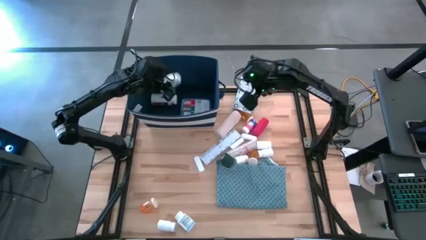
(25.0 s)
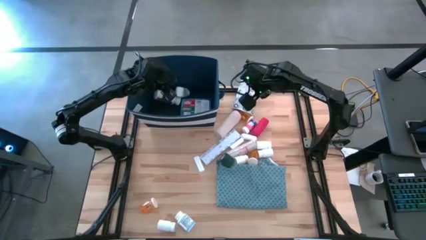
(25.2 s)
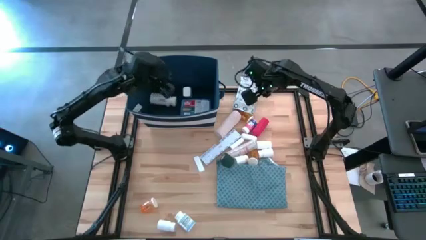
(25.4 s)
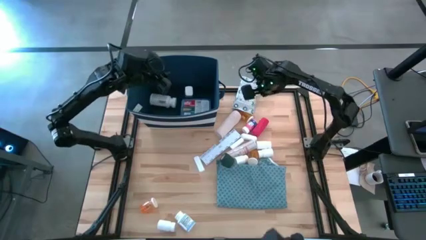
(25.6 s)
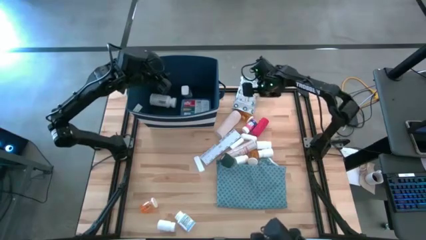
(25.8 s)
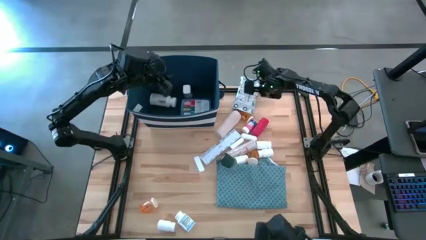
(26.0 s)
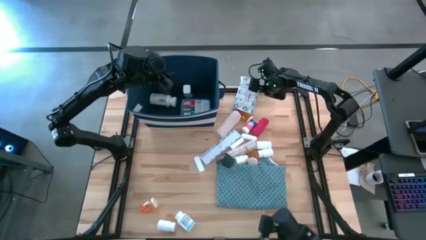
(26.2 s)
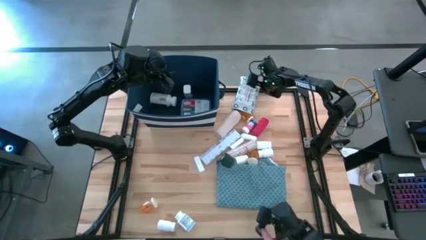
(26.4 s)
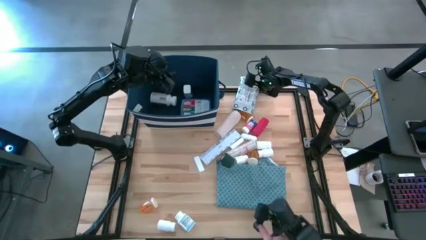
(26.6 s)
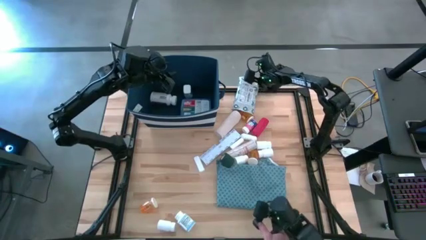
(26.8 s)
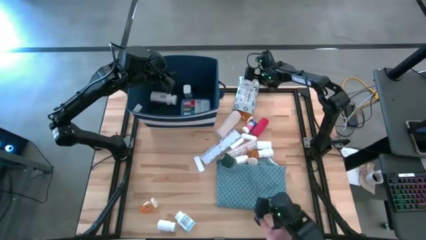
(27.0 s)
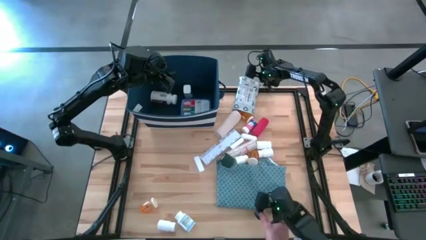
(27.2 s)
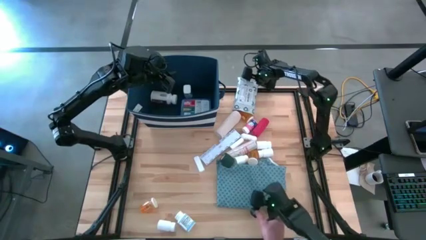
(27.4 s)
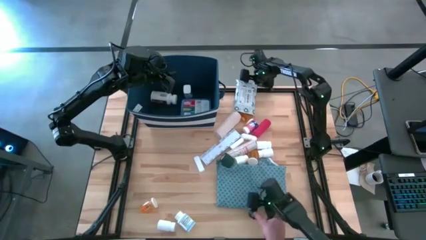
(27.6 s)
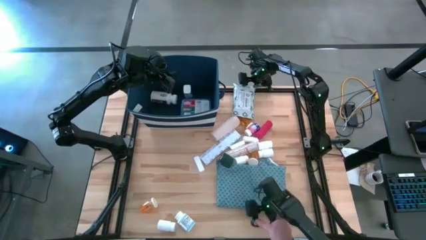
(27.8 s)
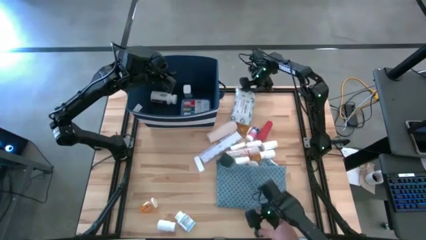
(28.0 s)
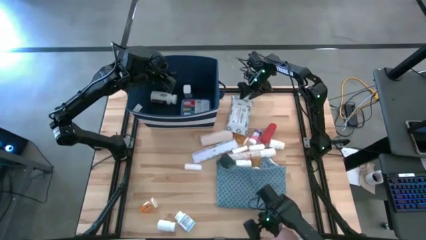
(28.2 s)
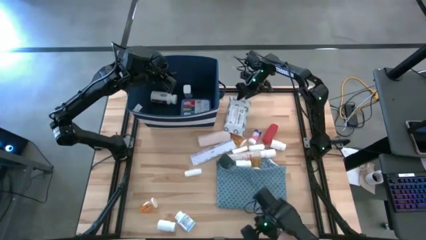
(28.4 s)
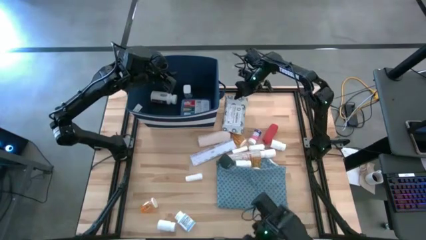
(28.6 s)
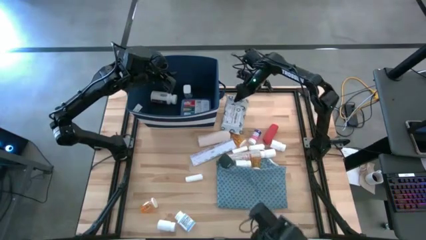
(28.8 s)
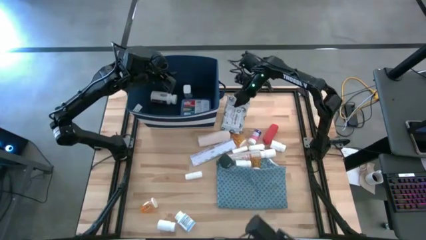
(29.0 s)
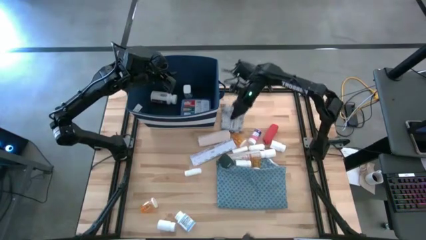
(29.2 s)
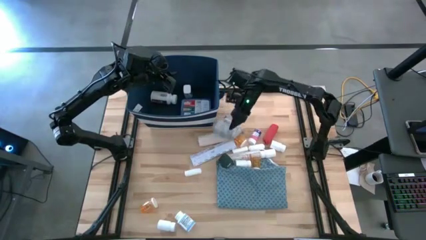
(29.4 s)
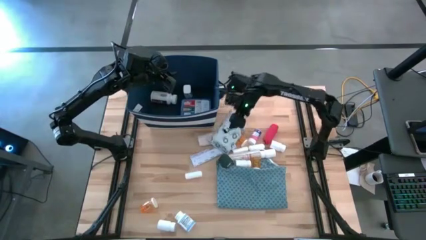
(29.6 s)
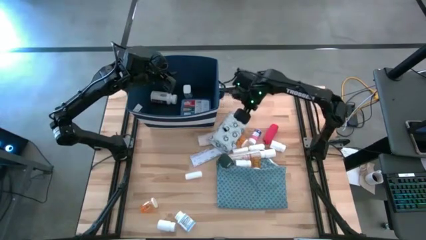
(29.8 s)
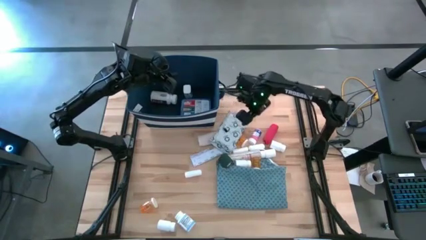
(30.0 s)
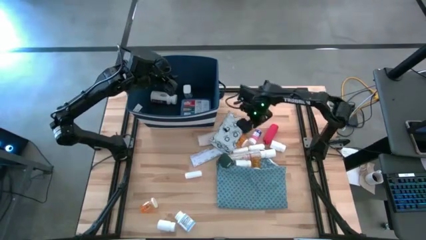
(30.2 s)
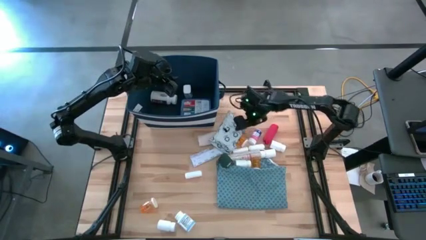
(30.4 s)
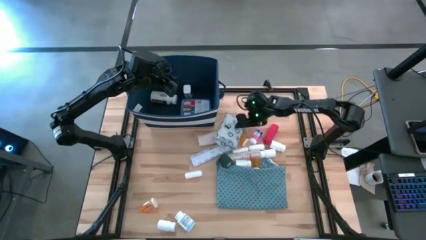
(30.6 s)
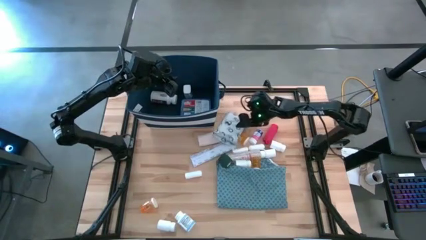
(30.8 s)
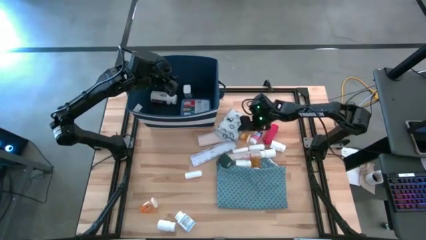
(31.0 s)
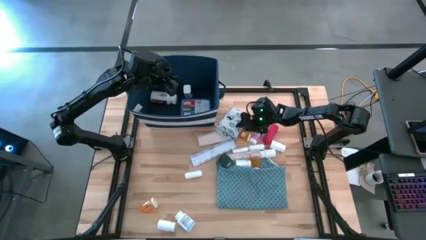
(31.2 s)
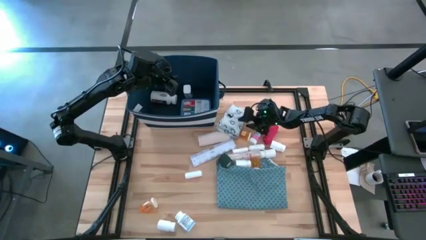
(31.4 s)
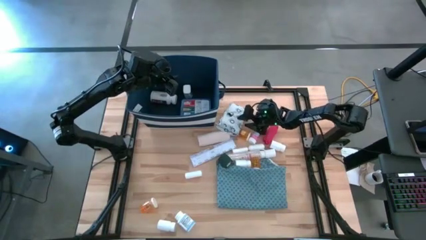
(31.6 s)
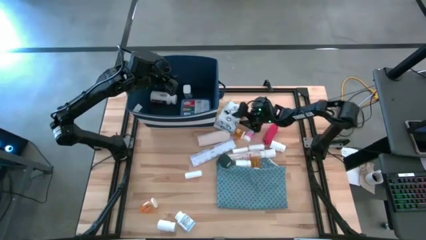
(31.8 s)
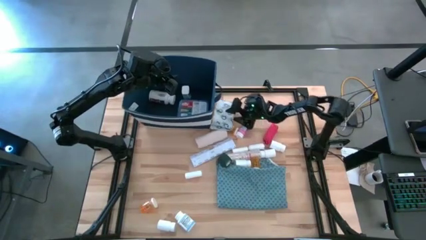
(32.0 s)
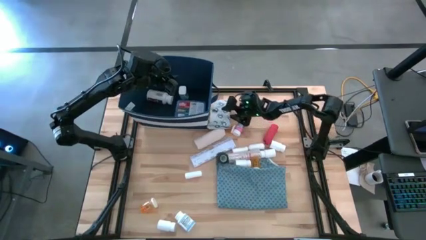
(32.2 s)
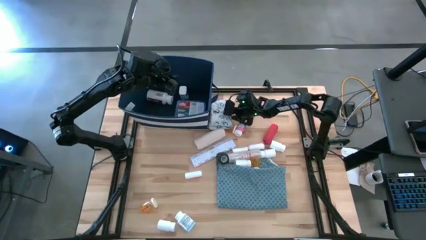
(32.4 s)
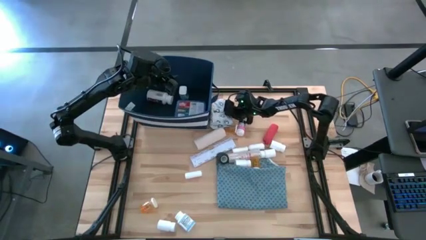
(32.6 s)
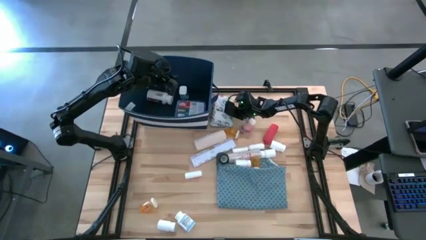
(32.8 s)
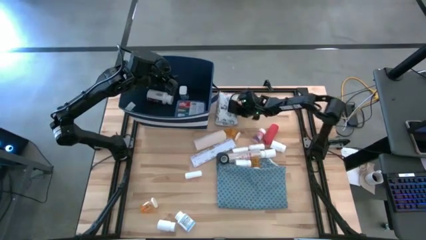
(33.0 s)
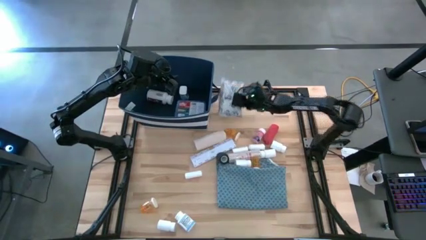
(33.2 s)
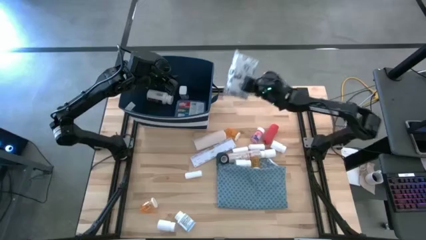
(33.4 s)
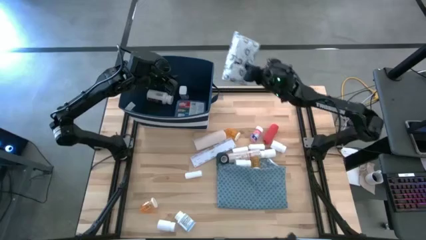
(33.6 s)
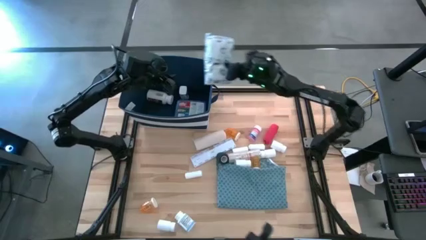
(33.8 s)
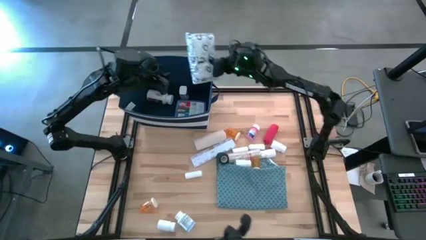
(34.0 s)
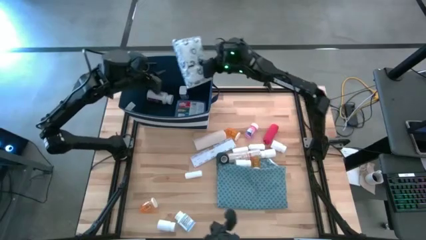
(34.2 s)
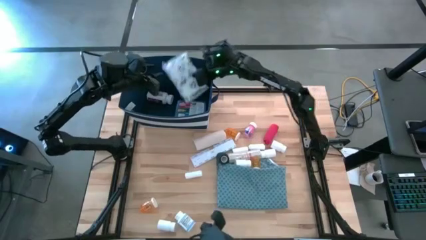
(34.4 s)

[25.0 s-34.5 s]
Task: Pick & place medical supplies in basket/bin
Put the light blue mailer bag into the blue bin

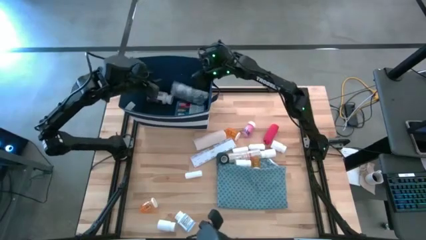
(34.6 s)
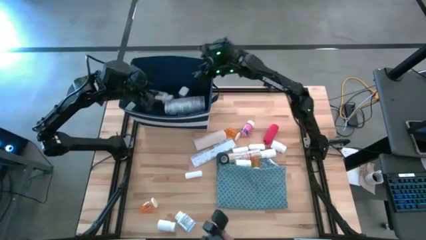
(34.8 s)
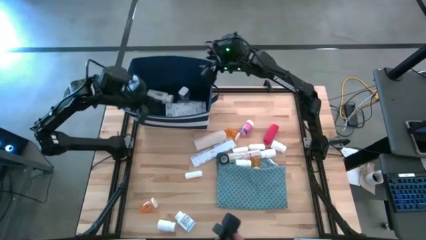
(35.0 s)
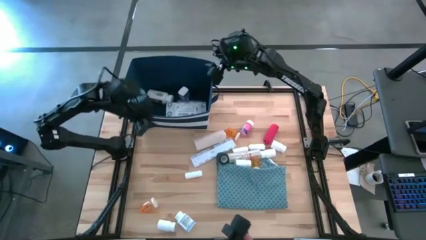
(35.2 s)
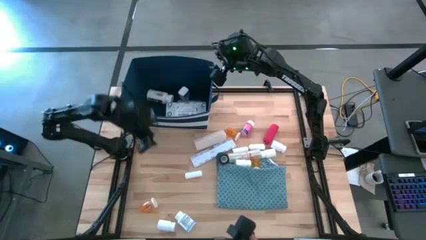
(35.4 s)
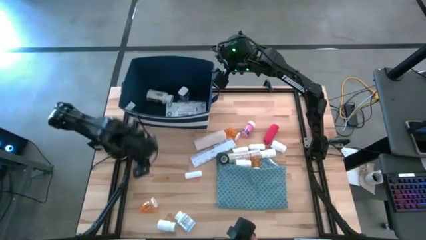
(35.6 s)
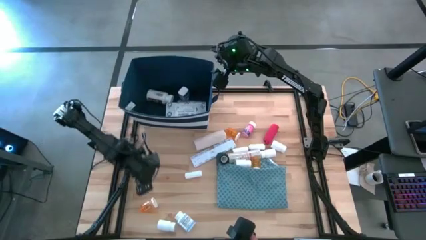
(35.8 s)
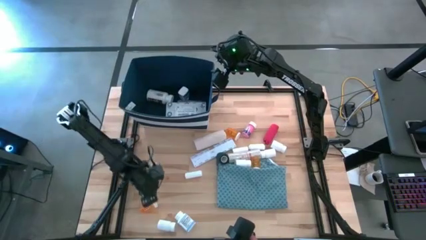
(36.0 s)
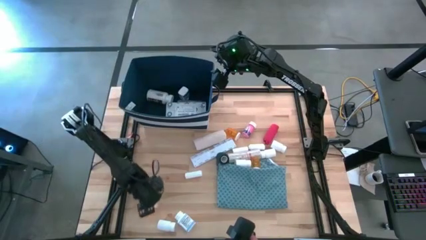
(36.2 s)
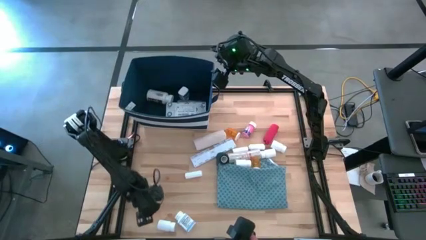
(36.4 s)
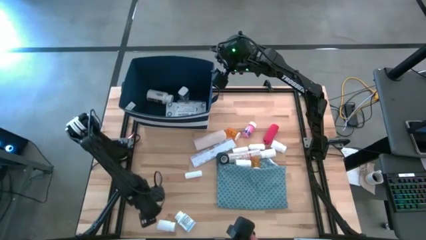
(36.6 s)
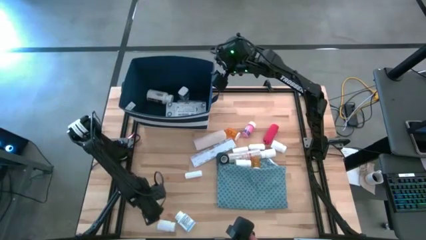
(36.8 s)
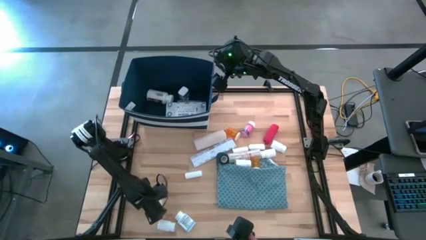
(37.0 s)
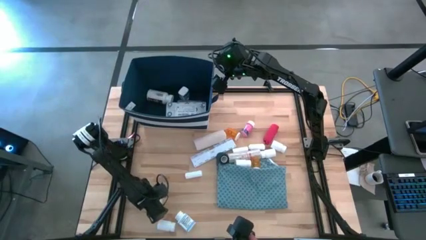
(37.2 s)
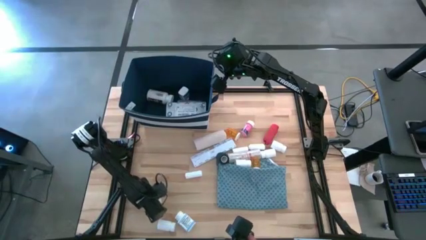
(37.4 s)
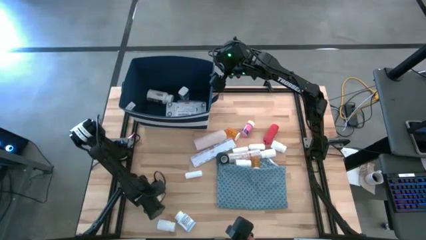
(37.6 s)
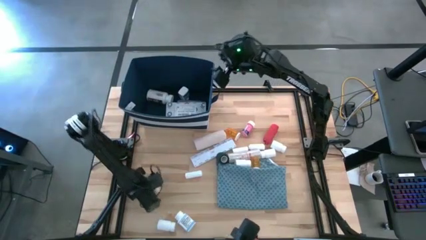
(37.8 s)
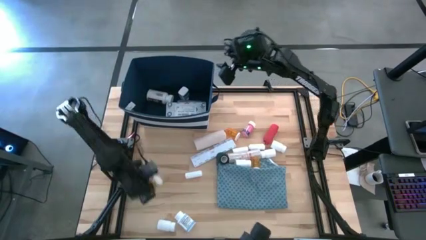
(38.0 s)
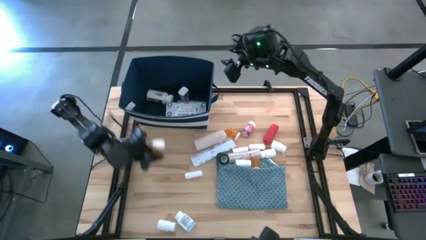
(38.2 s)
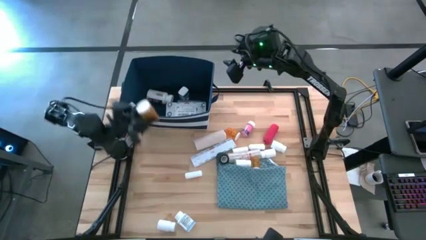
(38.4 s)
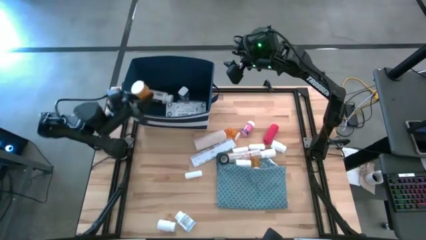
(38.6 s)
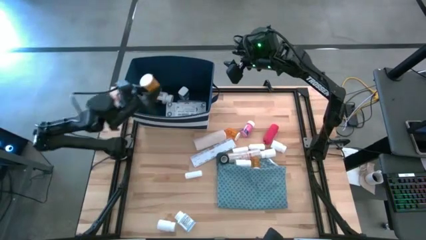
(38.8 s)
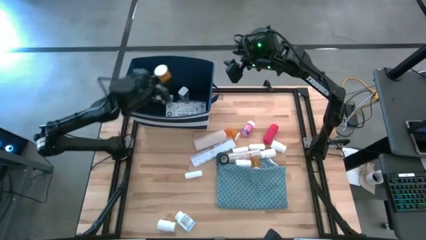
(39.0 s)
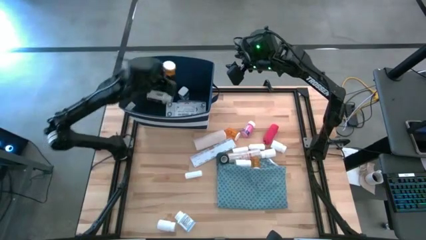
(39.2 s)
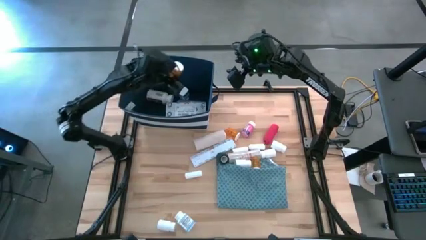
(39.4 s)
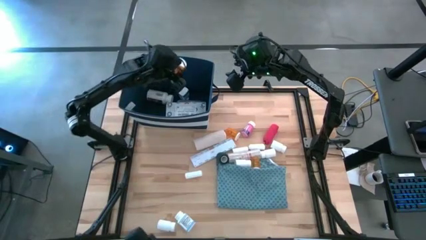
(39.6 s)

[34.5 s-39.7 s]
Put the transparent pill bottle into the blue bin

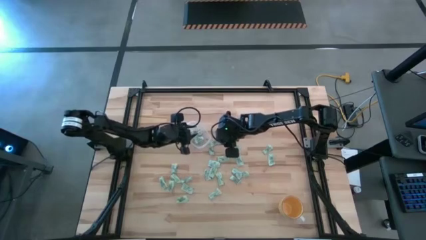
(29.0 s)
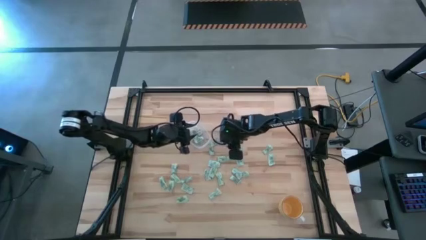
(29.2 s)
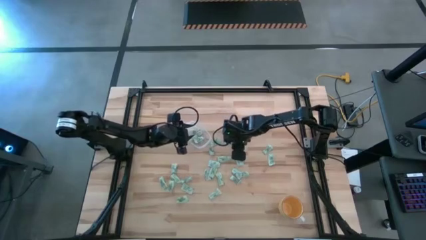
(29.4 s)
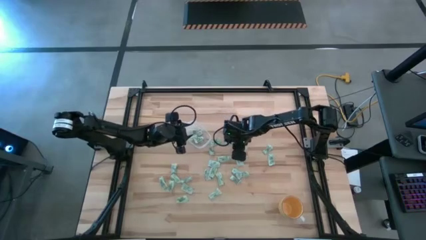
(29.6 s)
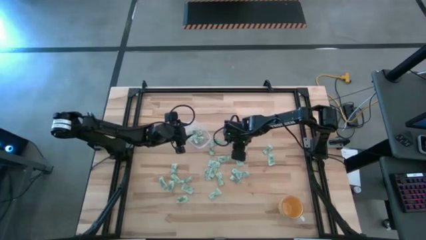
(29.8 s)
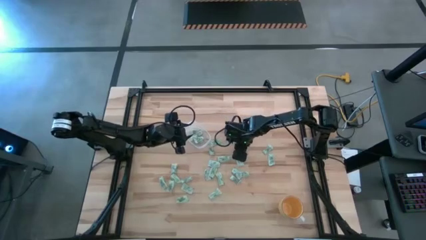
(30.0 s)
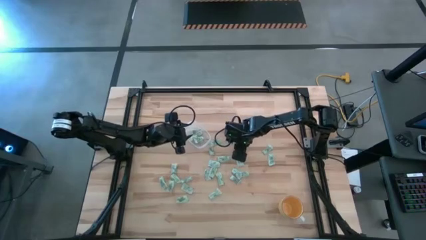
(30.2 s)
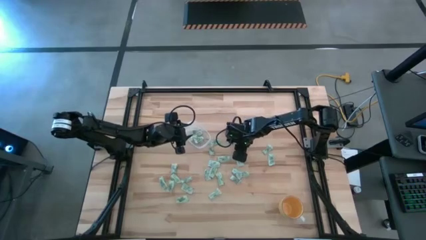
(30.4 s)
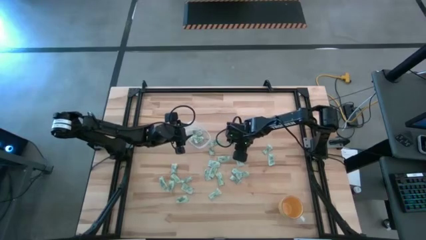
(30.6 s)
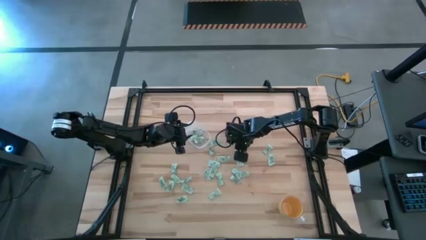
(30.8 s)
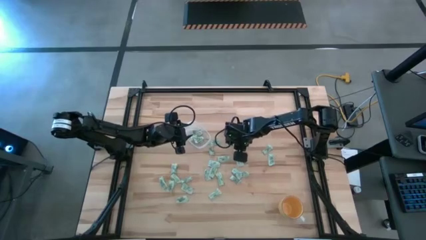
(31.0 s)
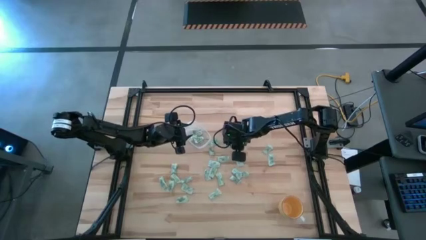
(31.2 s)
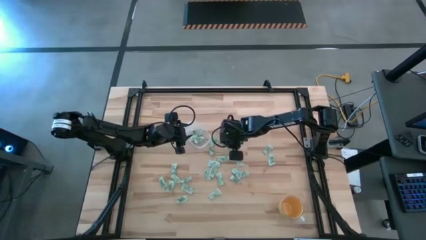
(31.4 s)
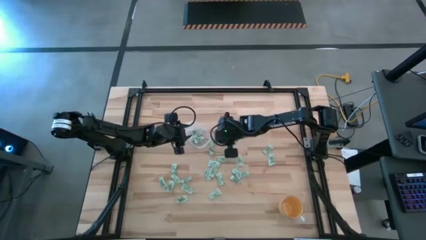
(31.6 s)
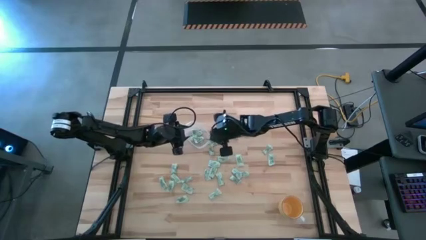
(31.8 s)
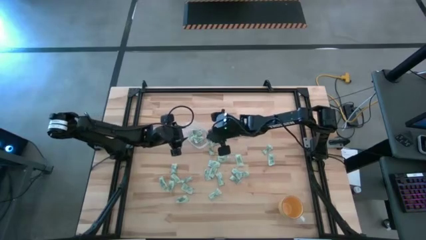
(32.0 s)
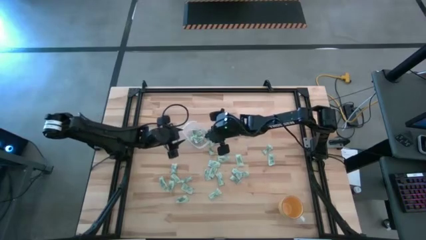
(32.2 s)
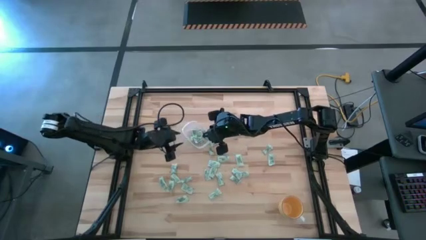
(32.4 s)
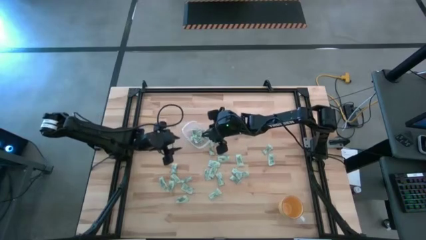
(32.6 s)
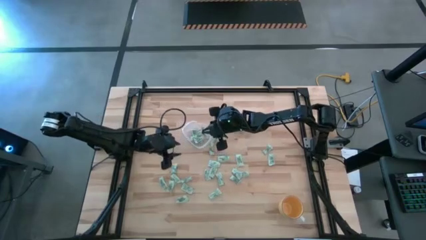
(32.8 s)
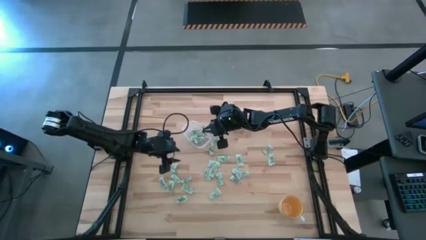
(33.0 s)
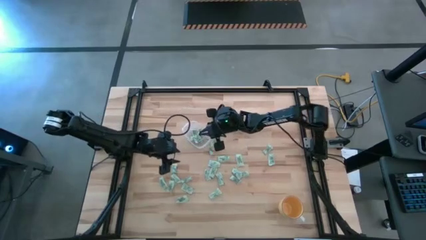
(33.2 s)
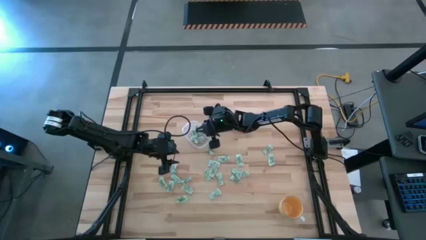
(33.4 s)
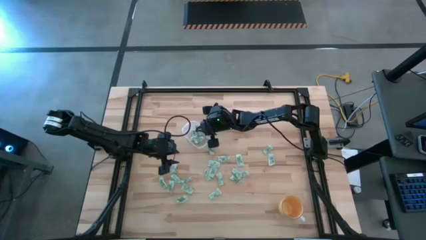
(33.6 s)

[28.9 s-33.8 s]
Task: Pick and place Stevia / Truvia into bins
Put the stevia packet into the transparent bin
